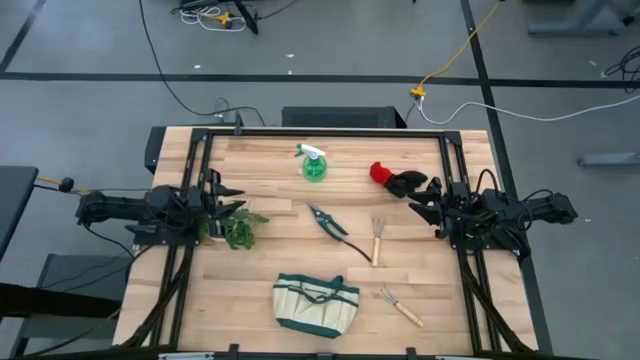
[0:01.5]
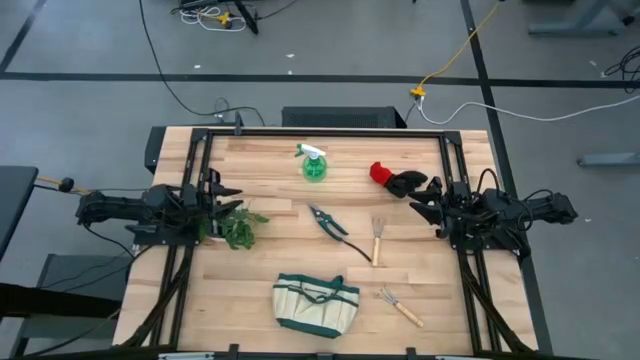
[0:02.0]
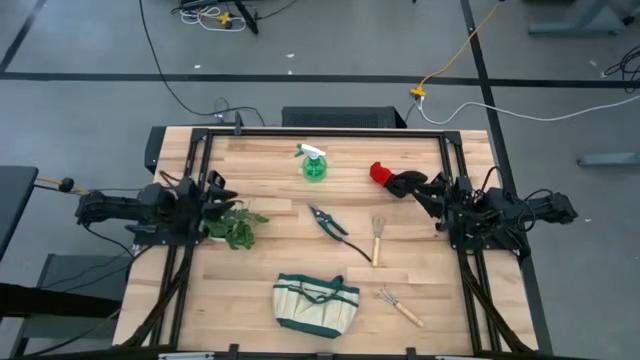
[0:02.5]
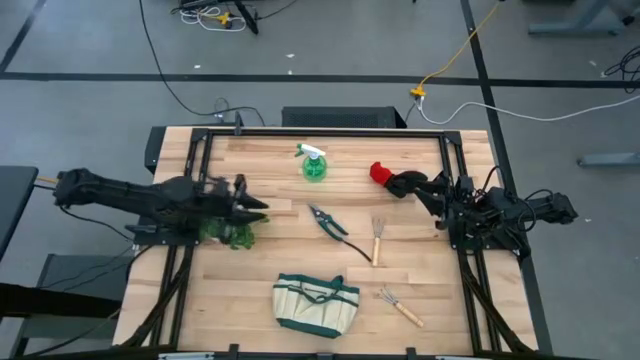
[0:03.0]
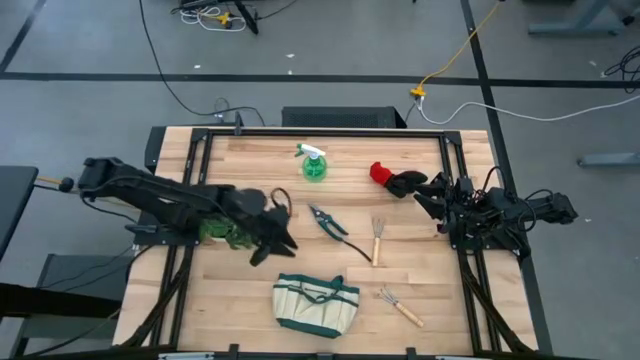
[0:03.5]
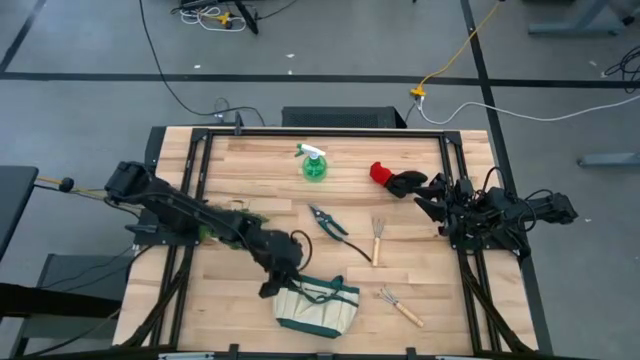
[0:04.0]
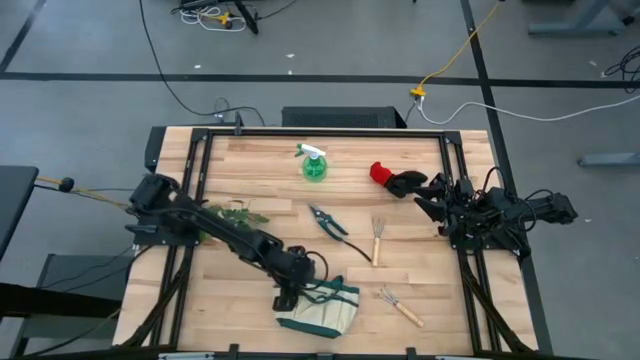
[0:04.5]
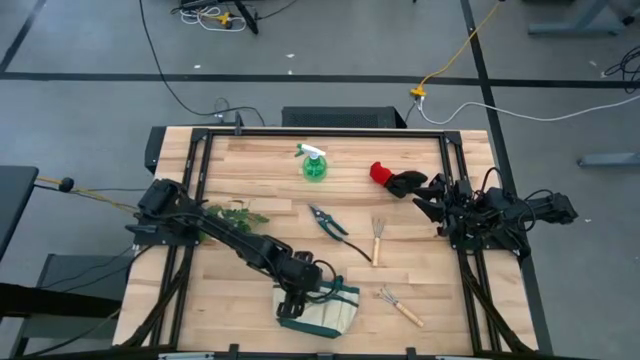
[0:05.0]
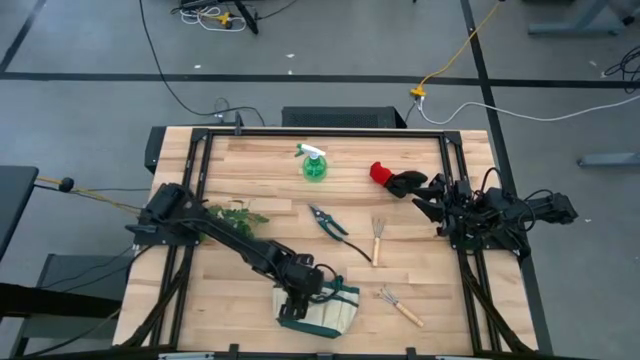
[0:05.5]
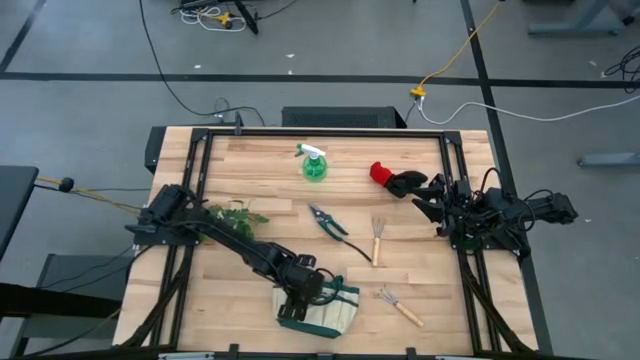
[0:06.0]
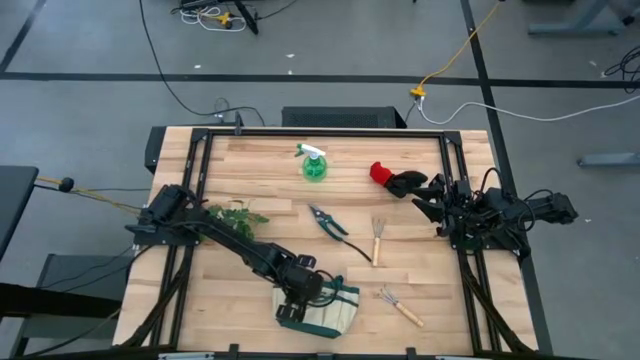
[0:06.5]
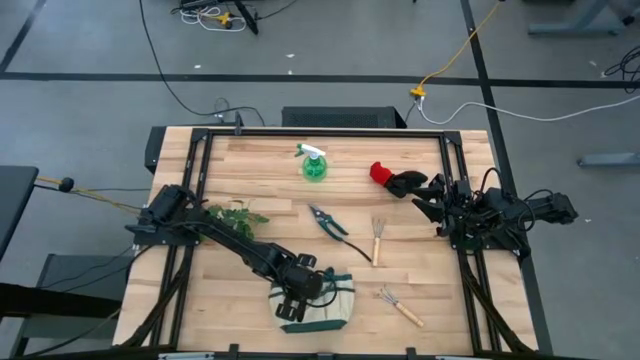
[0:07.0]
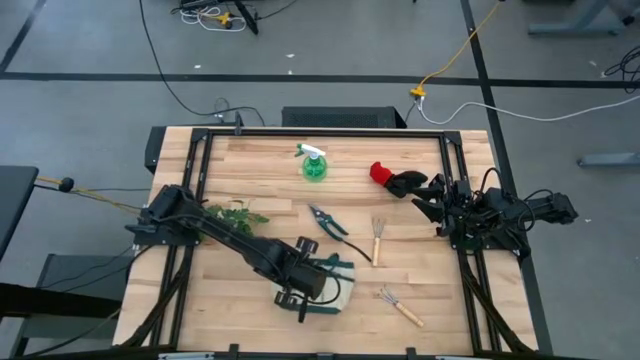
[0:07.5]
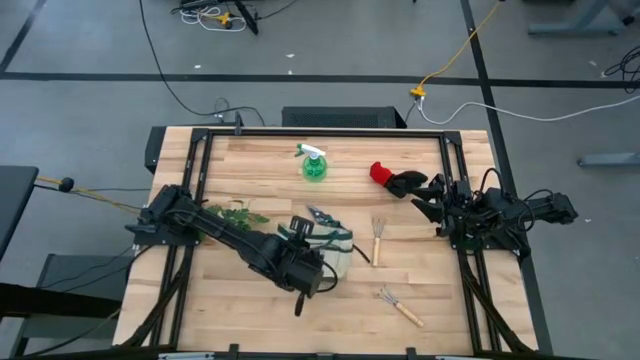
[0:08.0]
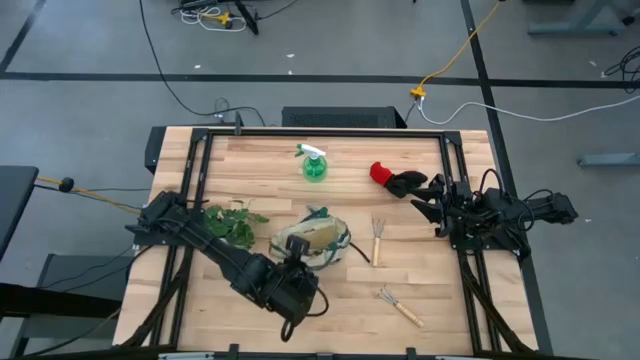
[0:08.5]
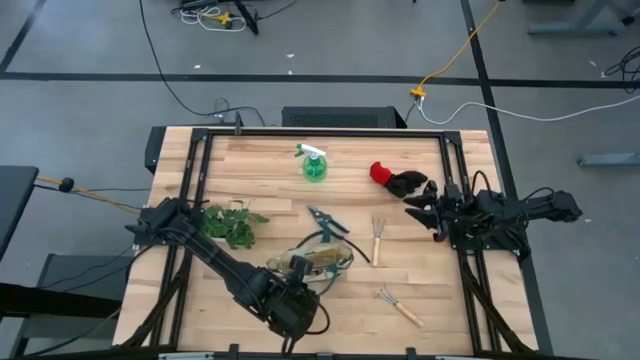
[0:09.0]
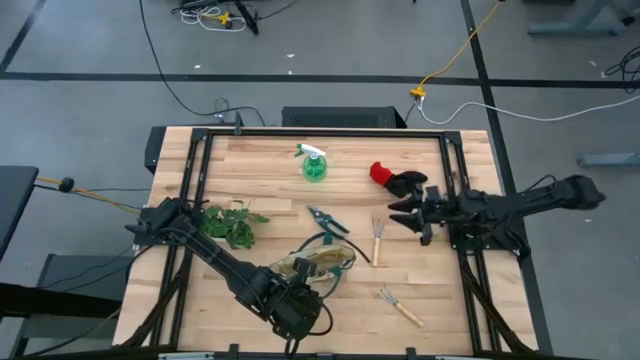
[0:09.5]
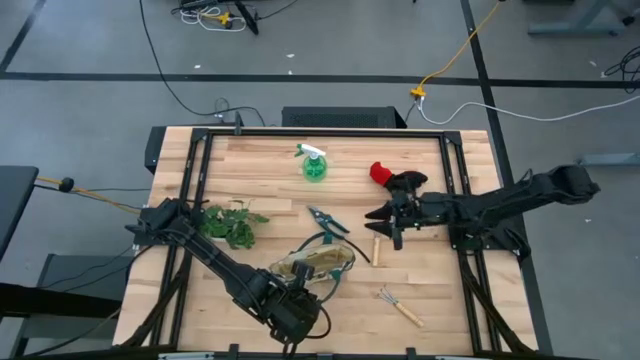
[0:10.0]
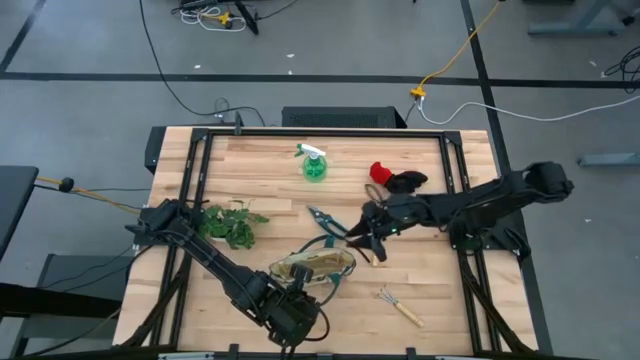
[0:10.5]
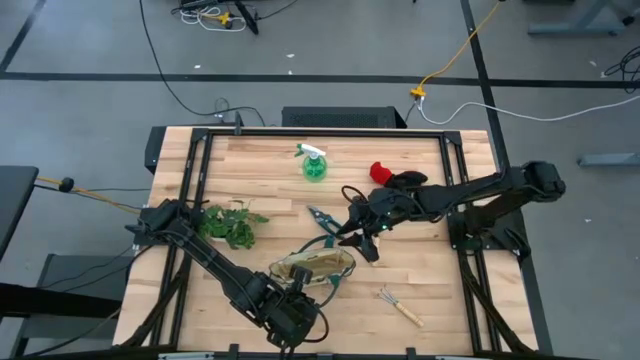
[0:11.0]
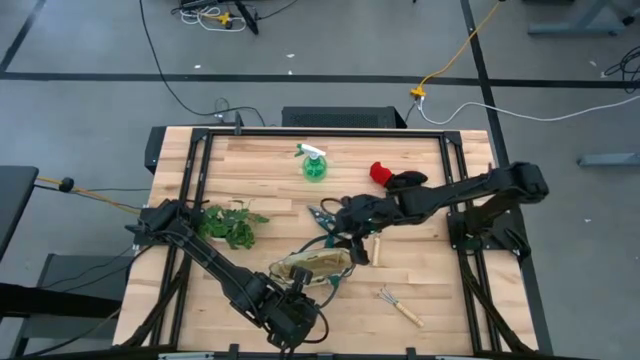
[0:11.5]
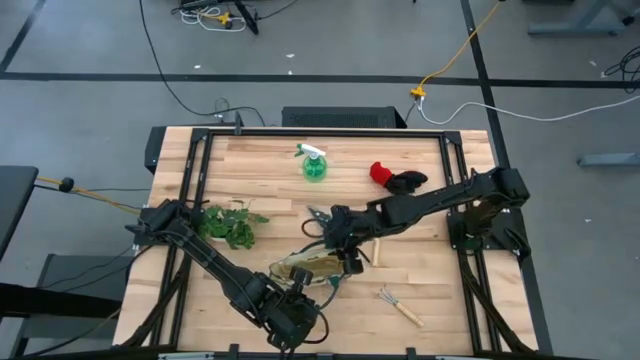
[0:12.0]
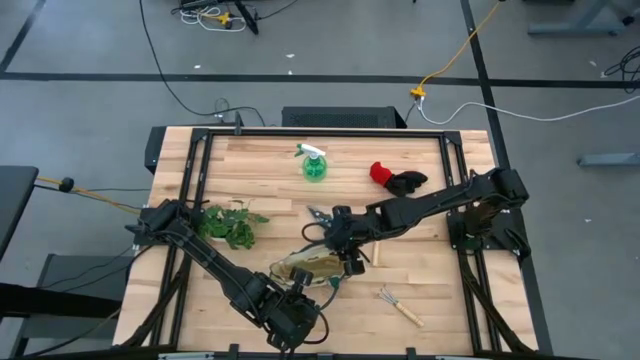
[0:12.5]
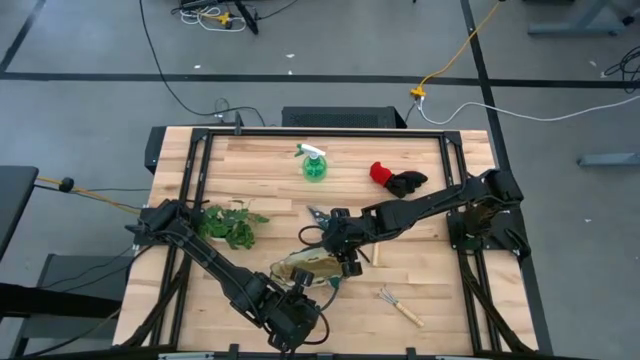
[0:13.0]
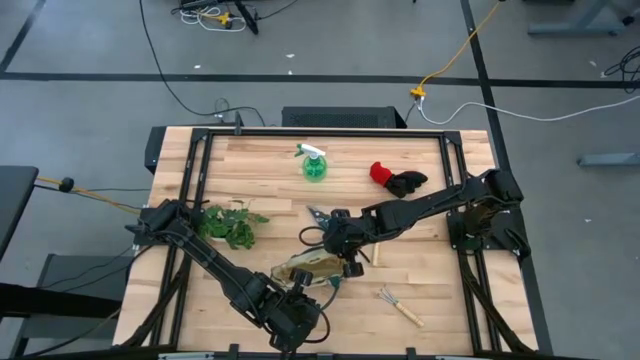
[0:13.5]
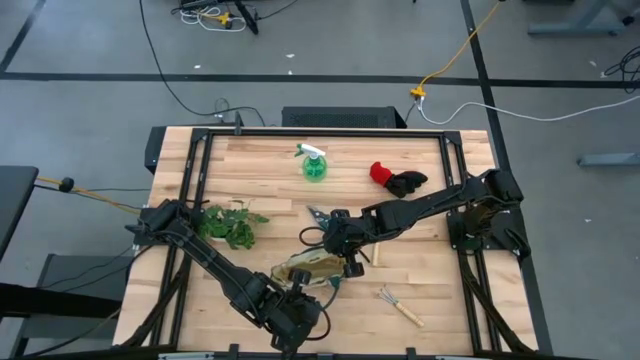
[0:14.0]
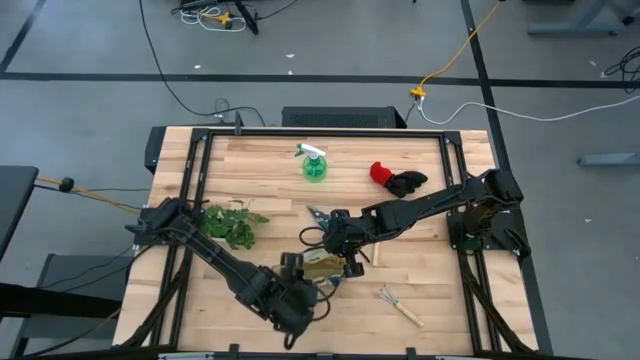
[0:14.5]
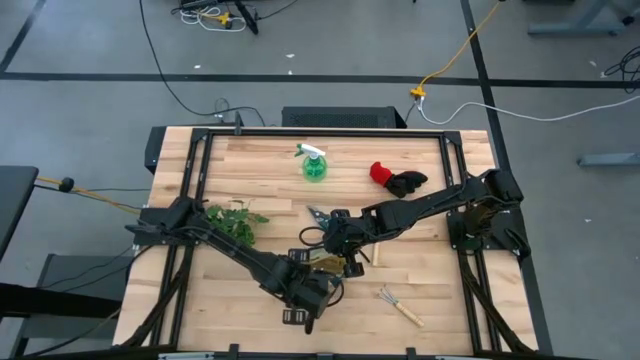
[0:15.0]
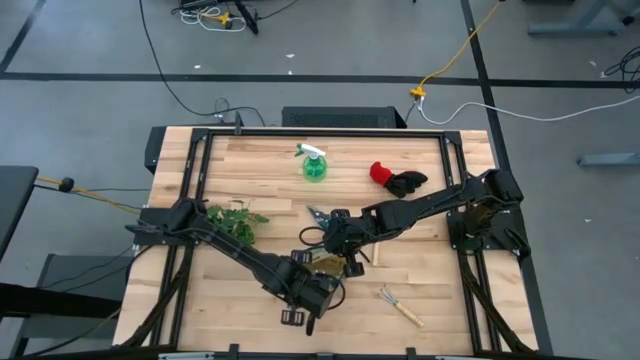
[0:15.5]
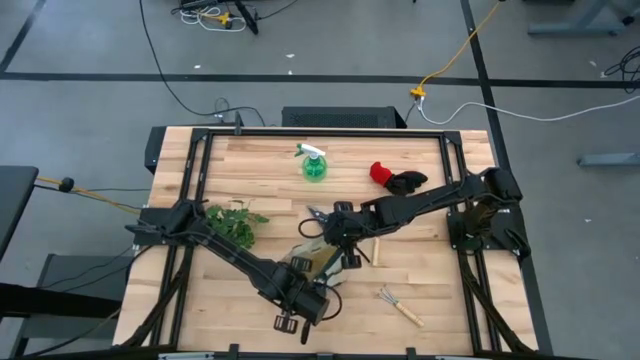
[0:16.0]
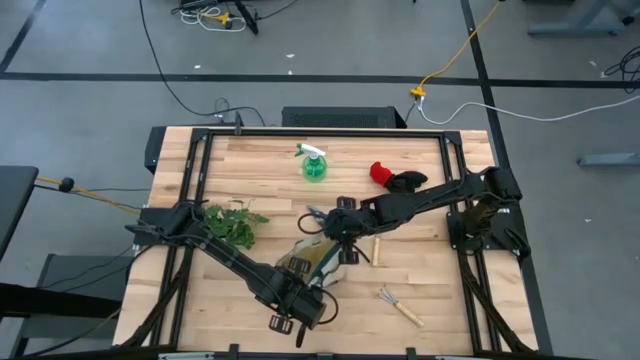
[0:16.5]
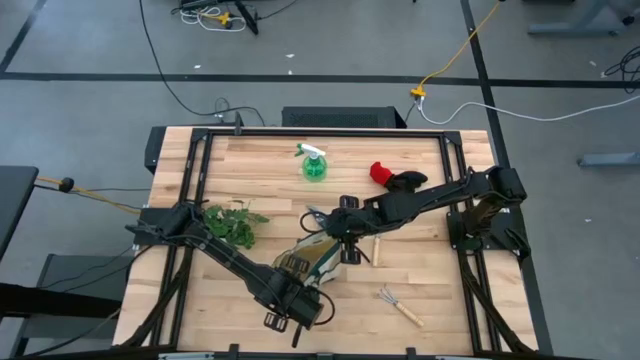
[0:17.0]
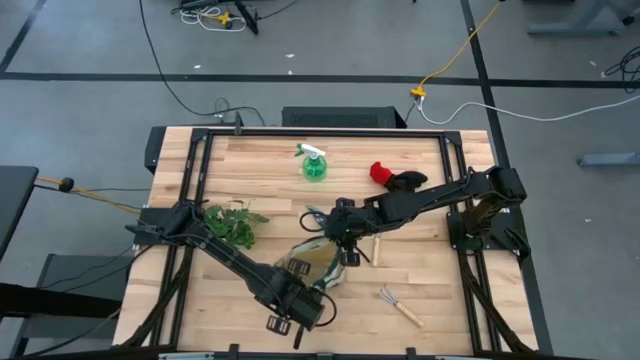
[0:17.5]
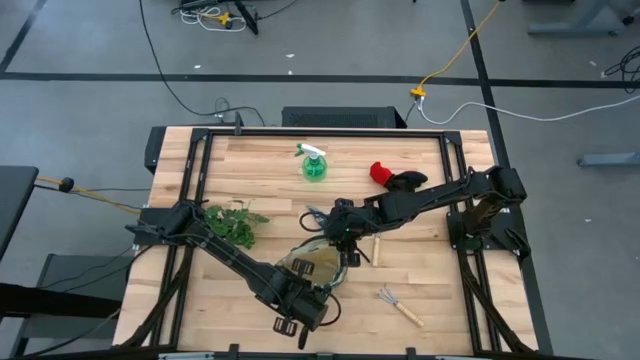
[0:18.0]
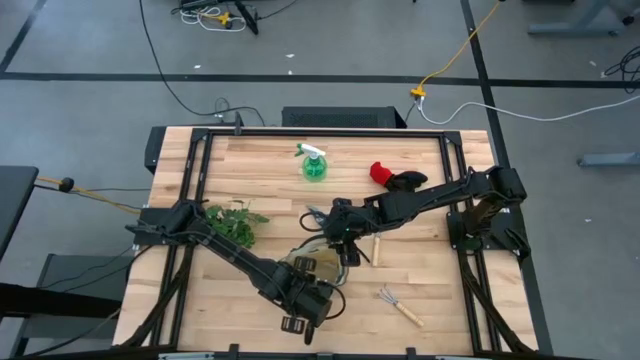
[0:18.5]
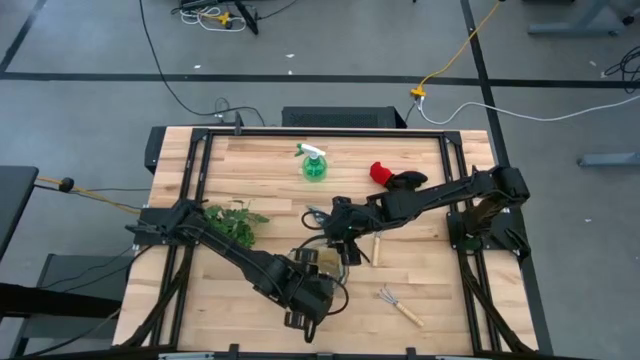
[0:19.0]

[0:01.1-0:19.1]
Task: Pick & Place Garden tools in Gardening bag
Open the gardening bag on the table

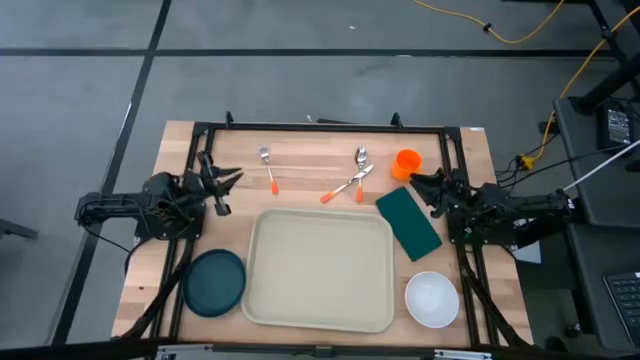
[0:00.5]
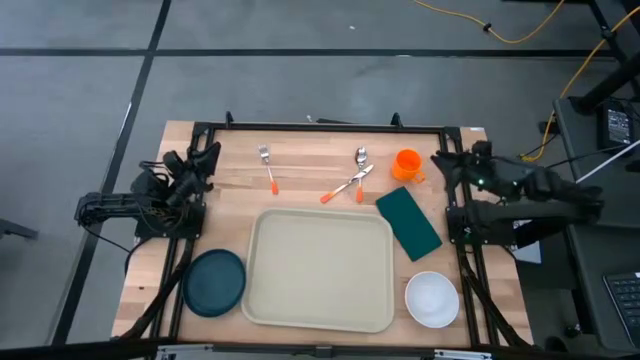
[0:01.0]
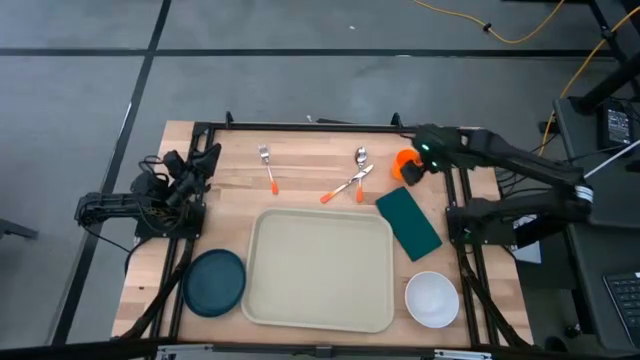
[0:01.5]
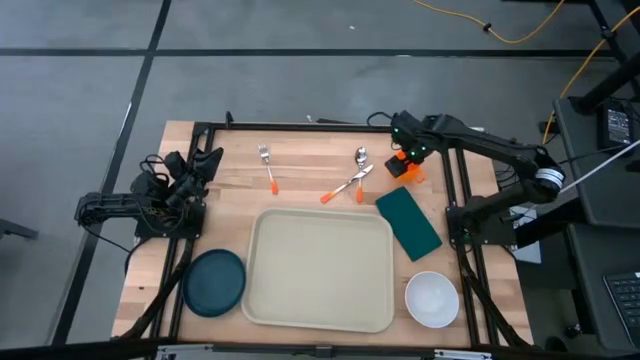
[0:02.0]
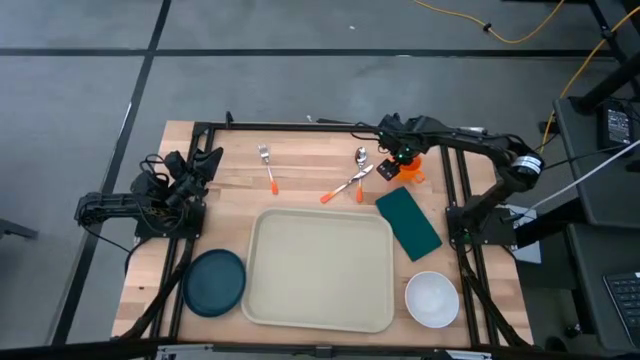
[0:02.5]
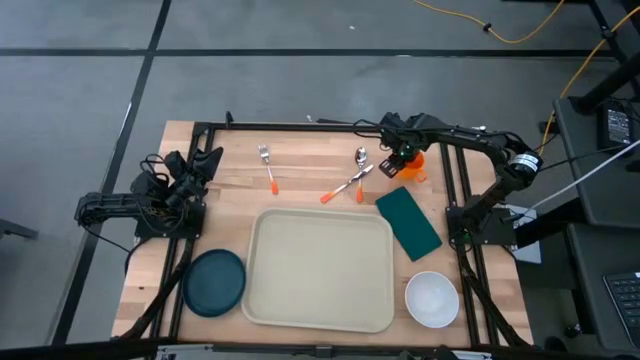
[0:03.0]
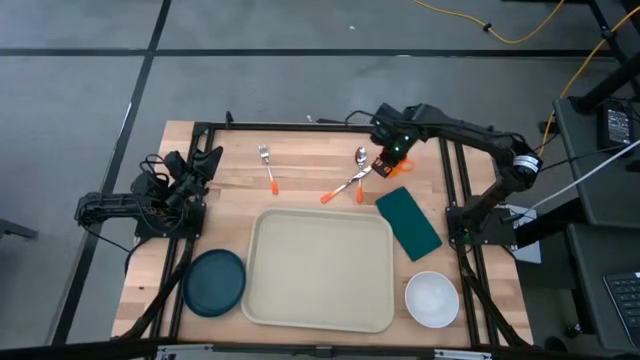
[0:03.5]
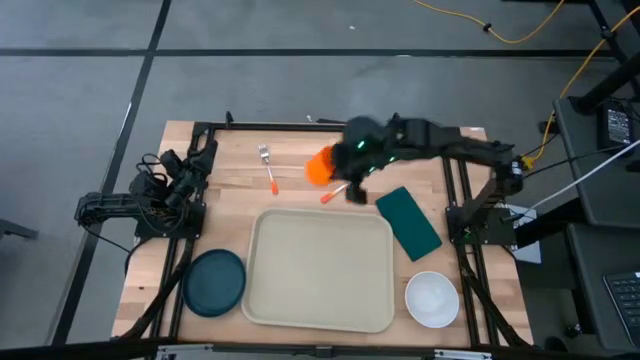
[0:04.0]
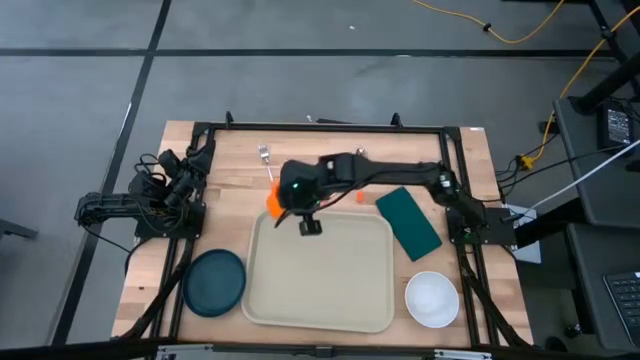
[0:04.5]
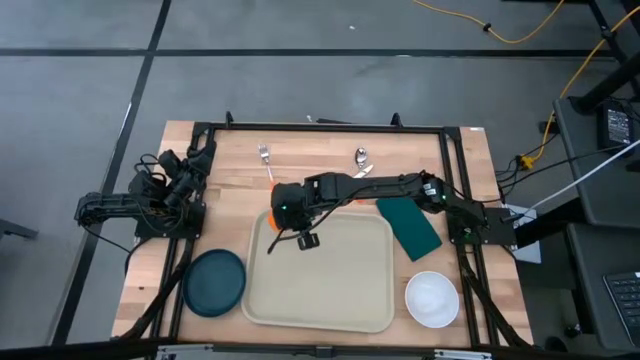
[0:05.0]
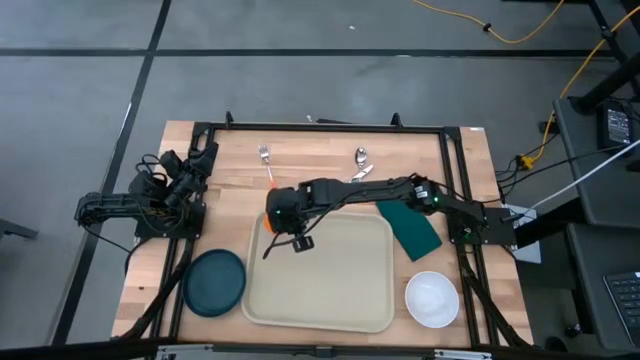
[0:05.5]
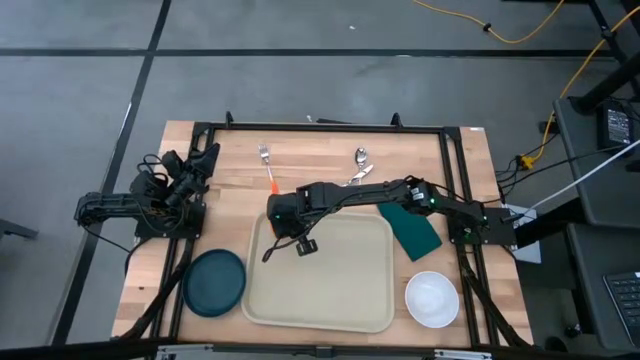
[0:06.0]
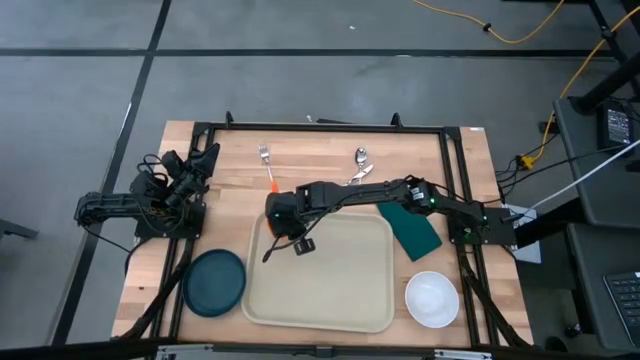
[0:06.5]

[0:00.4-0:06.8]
Task: Set up tray
Put the orange mug on the light brown serving tray
